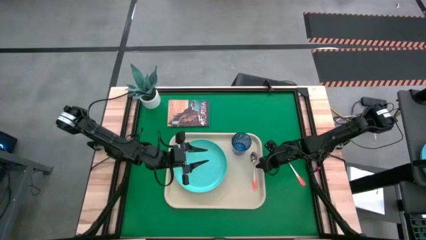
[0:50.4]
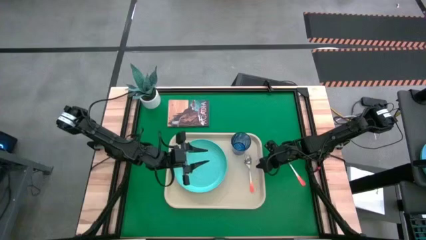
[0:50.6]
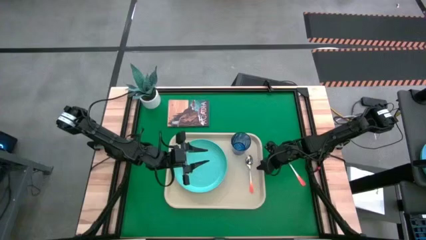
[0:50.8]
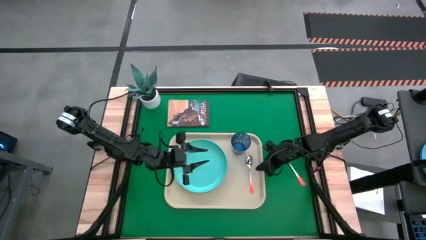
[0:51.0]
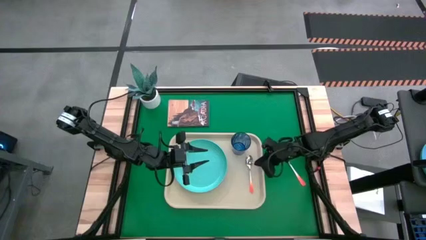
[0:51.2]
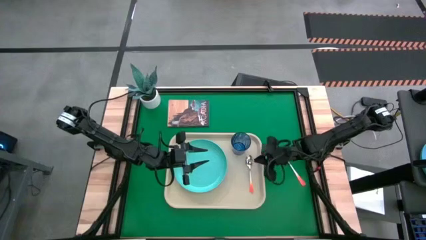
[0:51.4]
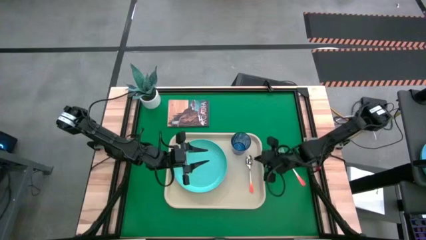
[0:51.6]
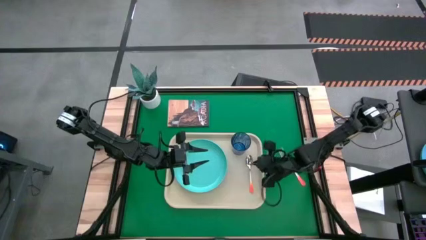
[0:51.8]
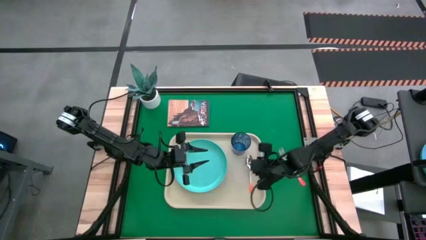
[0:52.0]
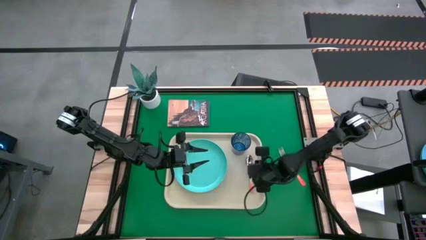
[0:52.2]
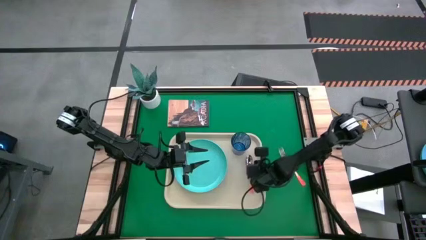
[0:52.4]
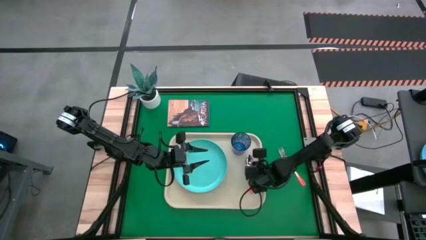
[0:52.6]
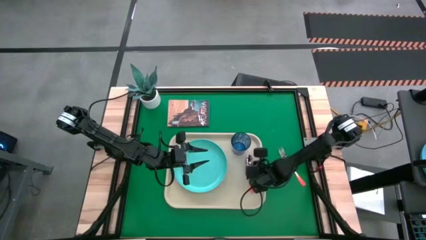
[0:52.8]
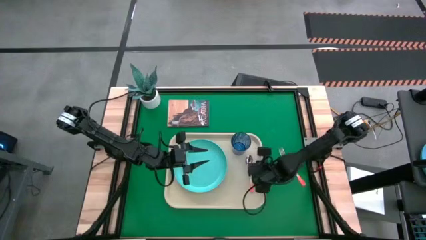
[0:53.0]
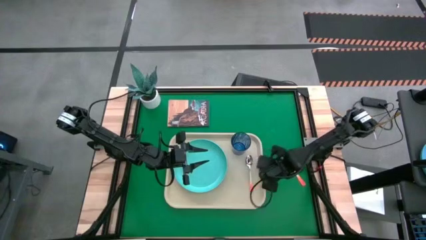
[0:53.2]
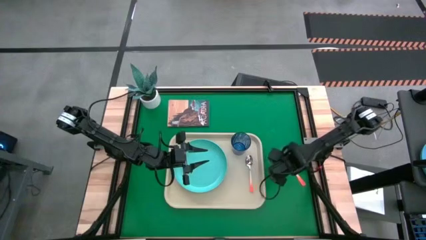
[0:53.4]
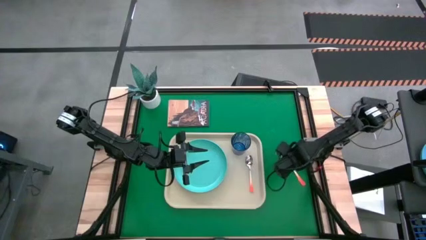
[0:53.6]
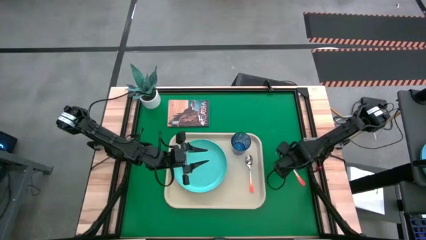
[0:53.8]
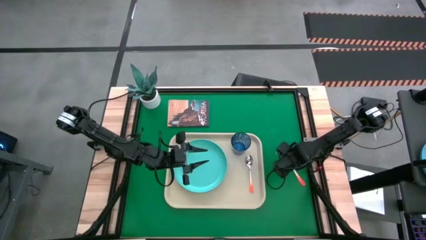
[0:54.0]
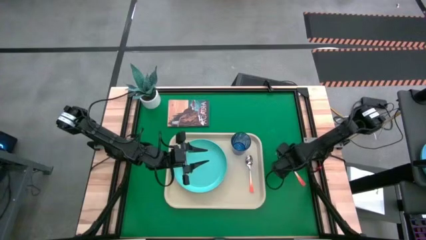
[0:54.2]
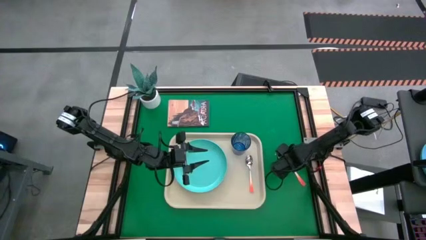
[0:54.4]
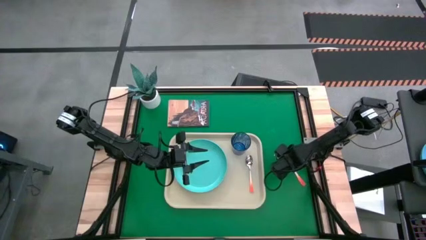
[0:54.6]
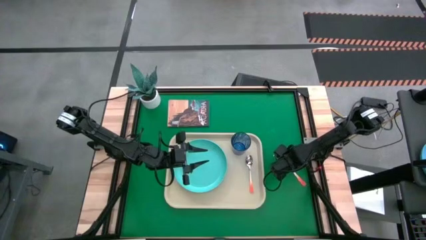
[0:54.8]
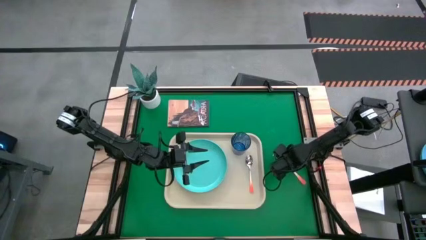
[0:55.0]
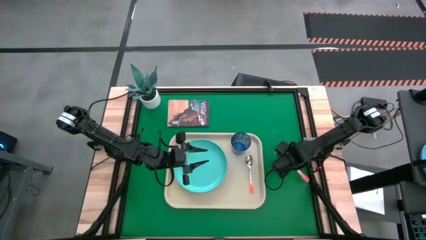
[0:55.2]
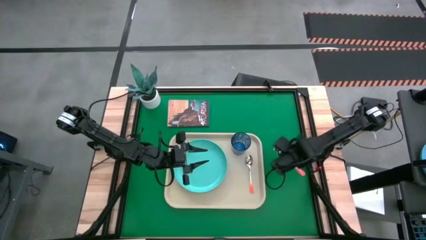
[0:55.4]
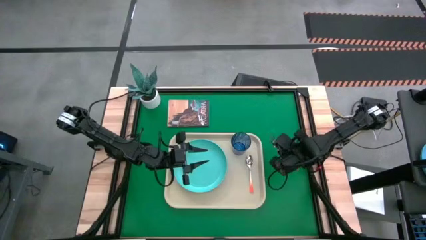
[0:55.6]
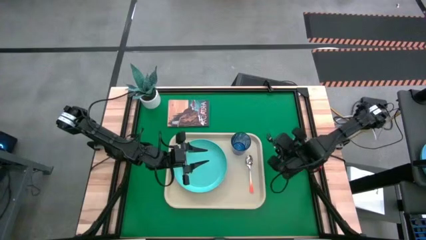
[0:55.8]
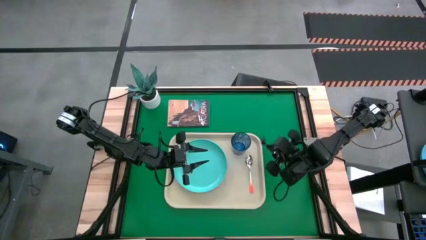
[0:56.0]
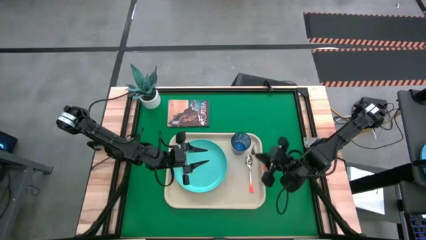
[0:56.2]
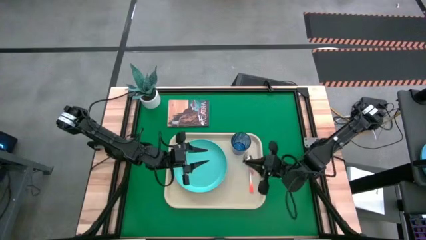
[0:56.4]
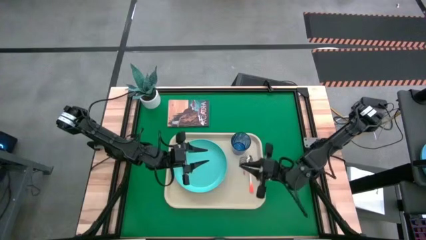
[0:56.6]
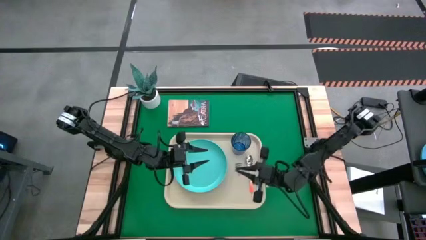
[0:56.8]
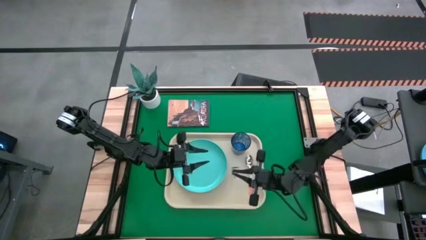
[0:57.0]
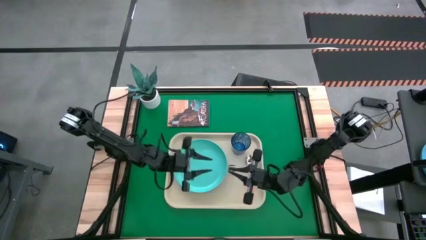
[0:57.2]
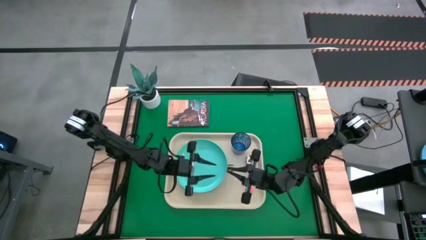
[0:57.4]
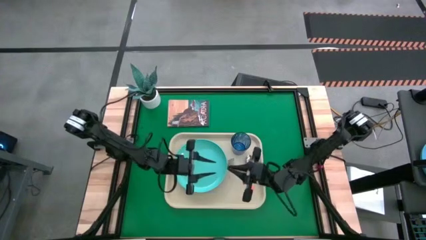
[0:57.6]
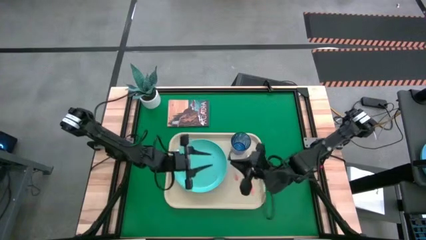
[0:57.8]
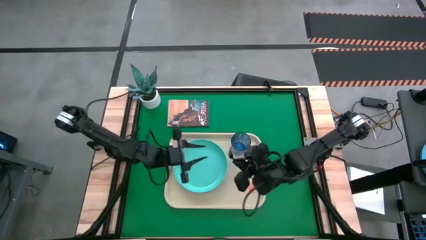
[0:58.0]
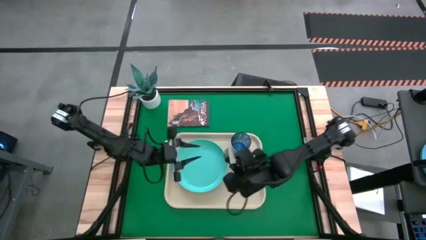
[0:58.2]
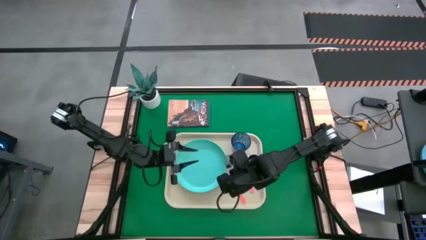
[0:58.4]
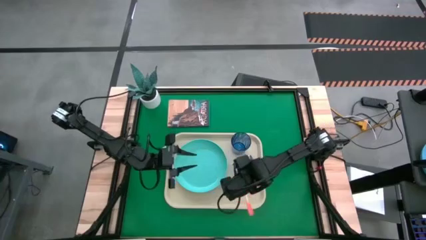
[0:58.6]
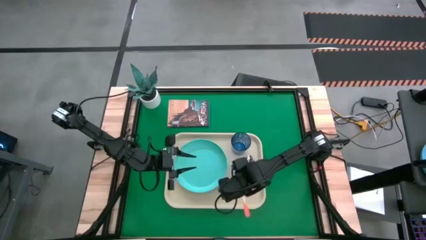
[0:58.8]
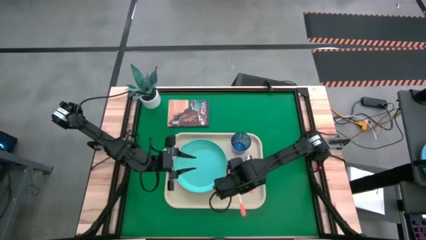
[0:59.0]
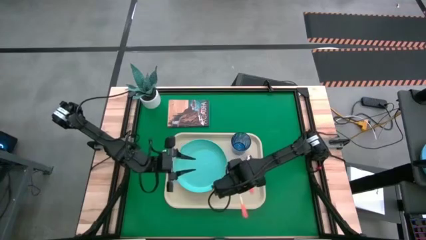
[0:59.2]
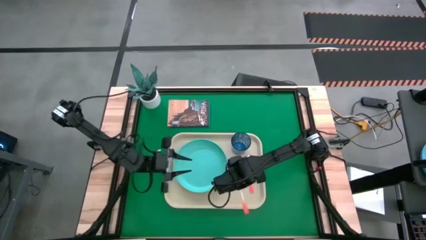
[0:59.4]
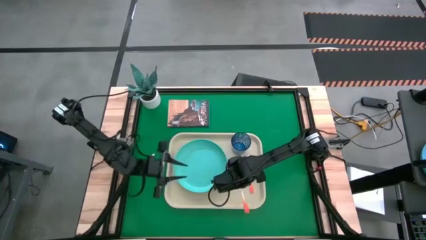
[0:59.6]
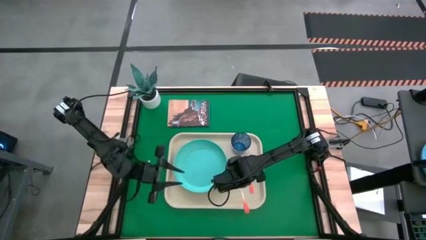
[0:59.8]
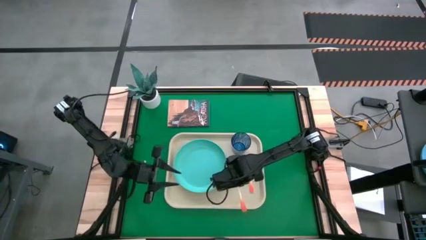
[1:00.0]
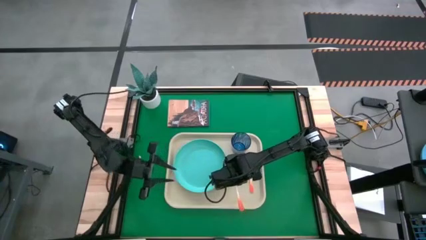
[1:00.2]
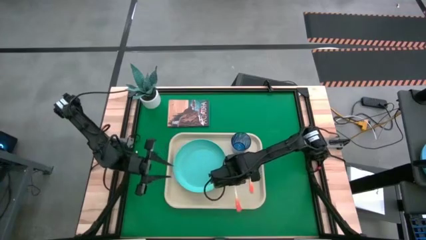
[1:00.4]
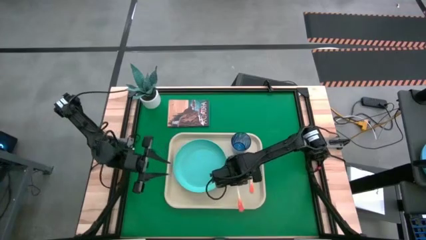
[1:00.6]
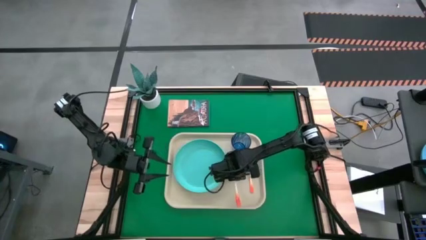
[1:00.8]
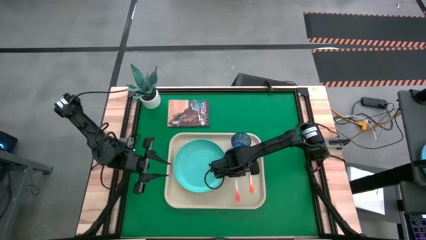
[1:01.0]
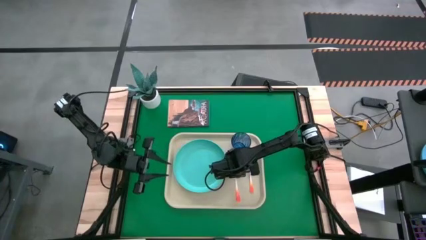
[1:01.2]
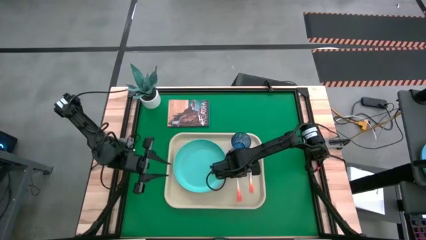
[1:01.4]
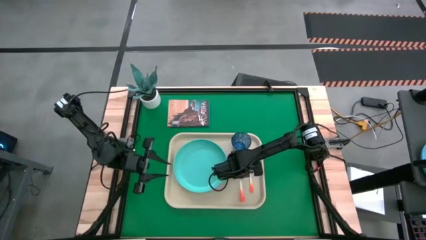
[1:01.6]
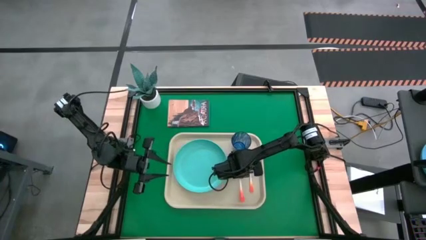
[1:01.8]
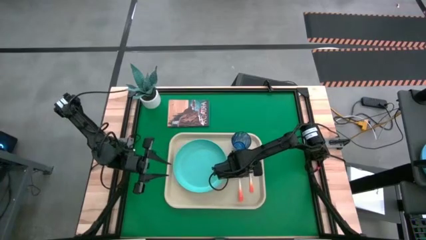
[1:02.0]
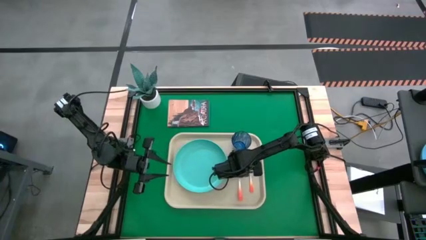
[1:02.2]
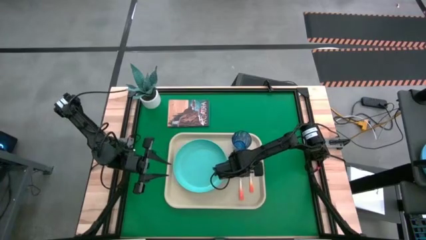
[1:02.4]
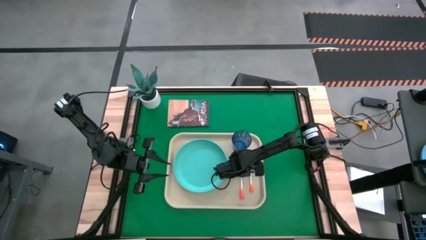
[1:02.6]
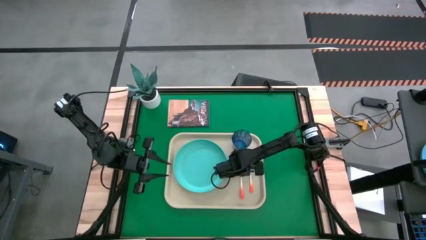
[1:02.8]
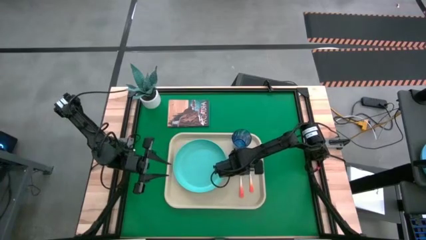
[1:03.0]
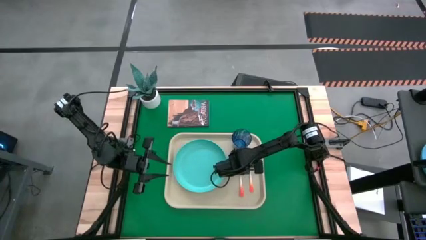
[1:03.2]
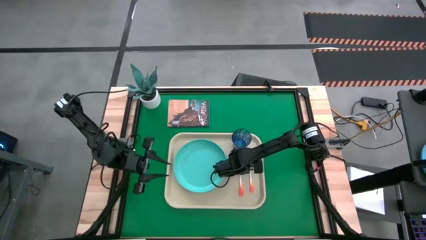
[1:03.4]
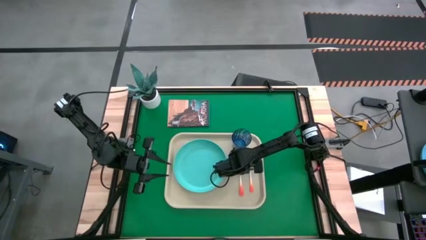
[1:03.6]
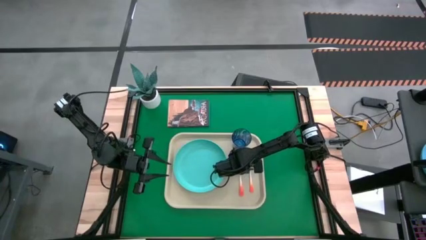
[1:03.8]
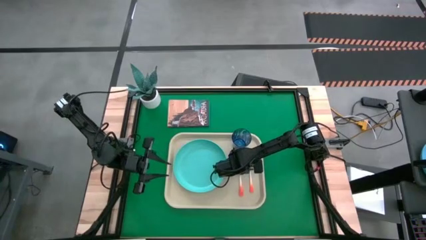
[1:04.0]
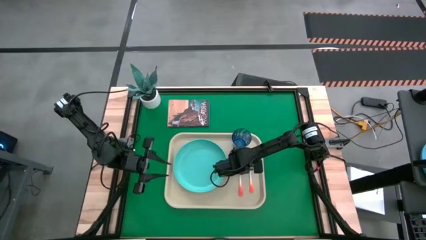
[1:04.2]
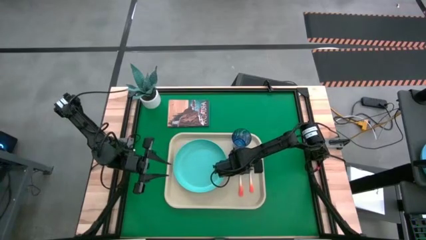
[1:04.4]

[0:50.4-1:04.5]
Task: Pick and place plate/cup/fork/spoon on tray
Put the orange fork beside the blue plate on the serving tray
